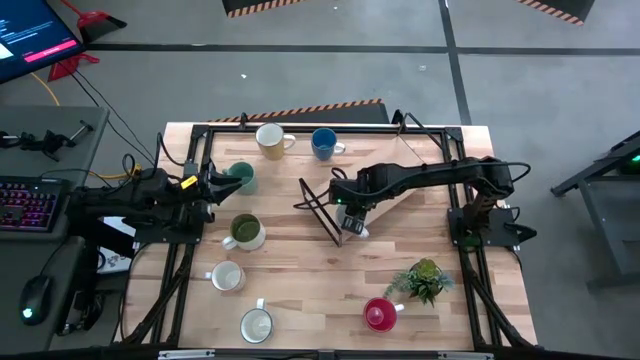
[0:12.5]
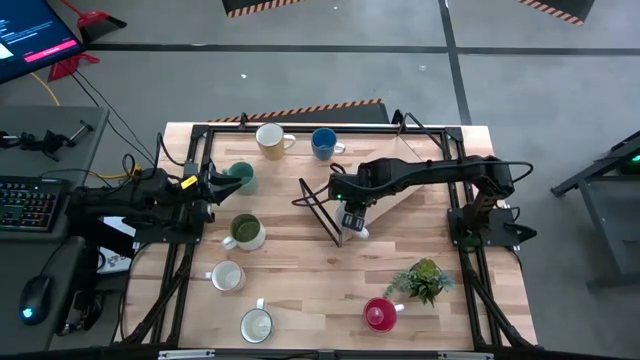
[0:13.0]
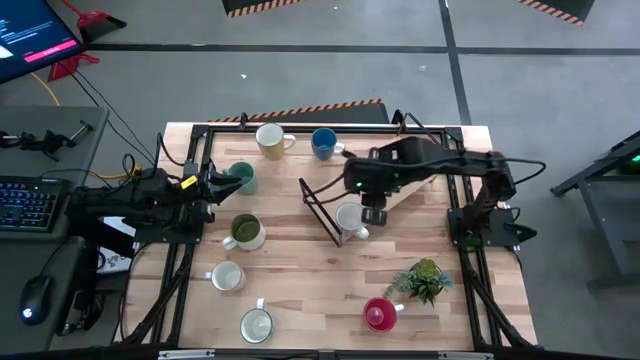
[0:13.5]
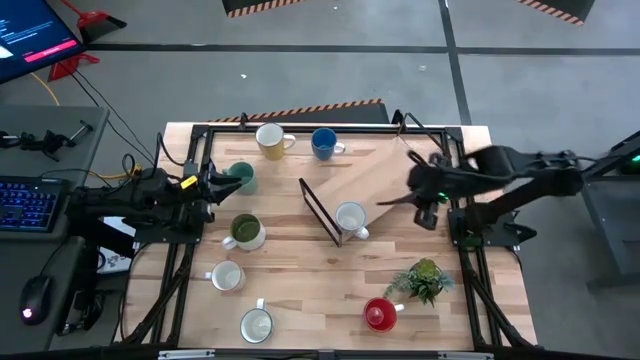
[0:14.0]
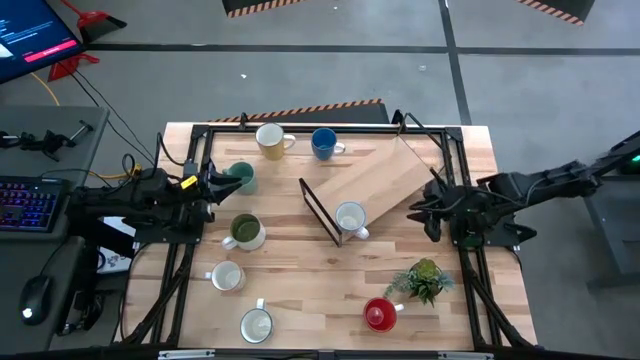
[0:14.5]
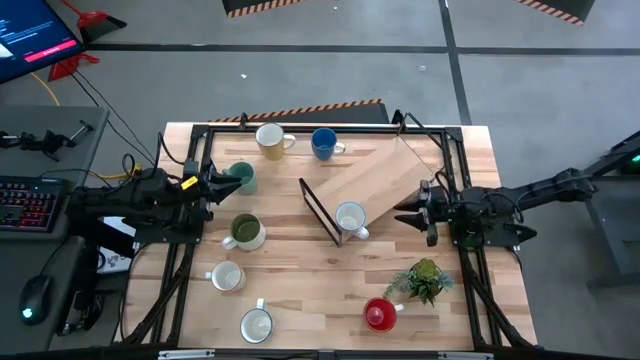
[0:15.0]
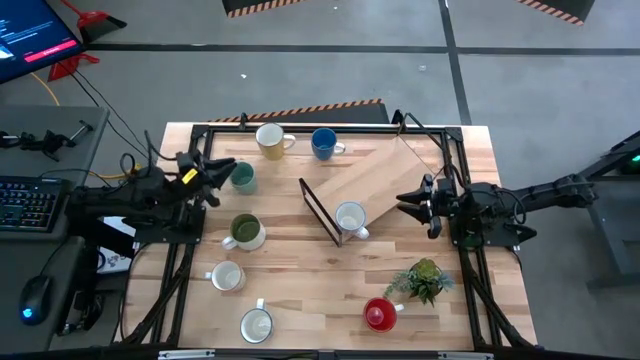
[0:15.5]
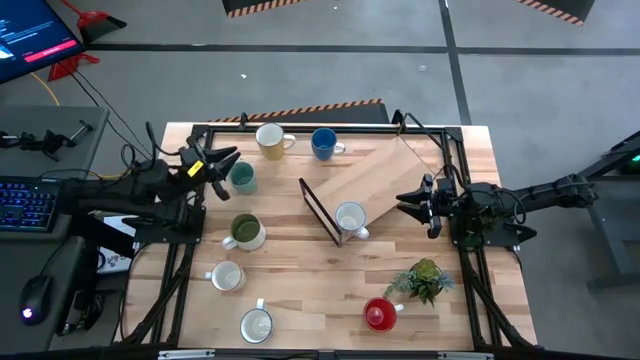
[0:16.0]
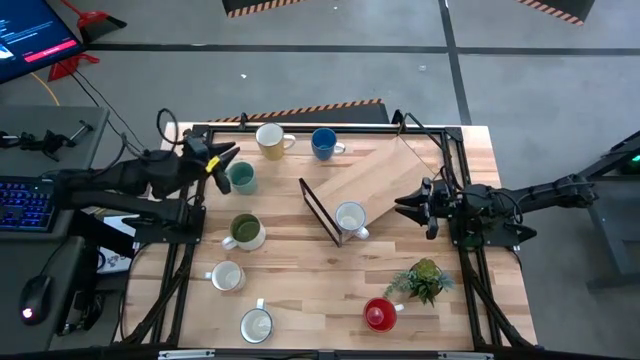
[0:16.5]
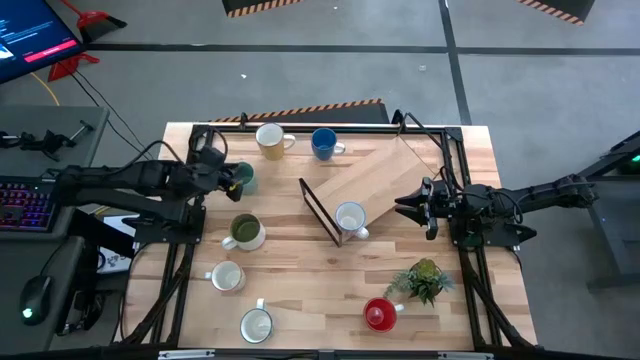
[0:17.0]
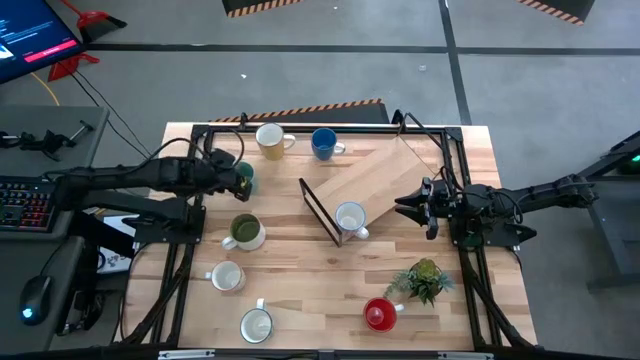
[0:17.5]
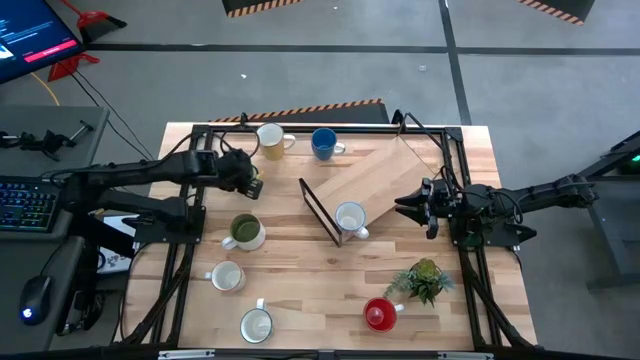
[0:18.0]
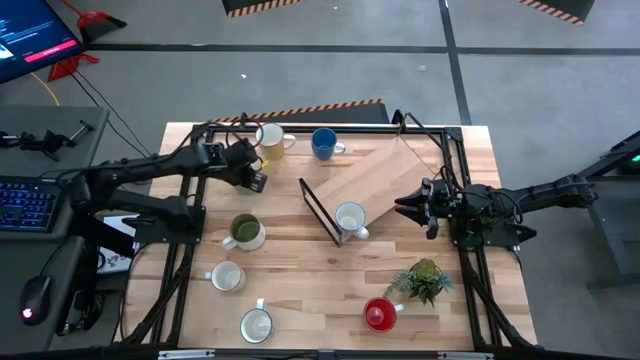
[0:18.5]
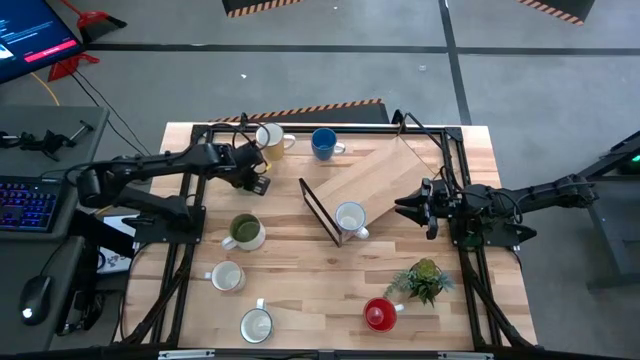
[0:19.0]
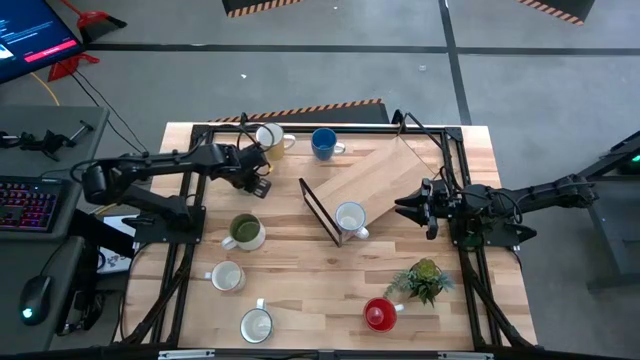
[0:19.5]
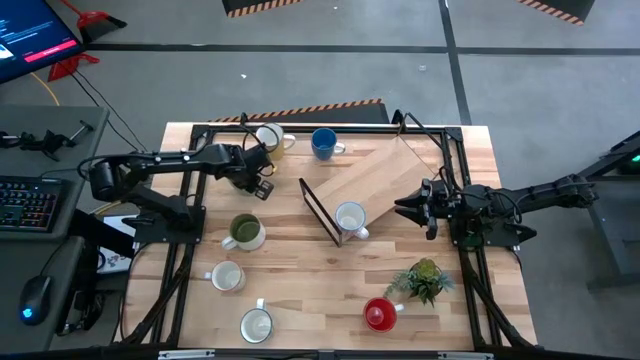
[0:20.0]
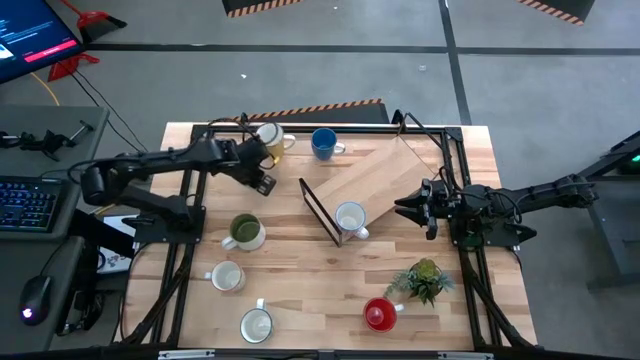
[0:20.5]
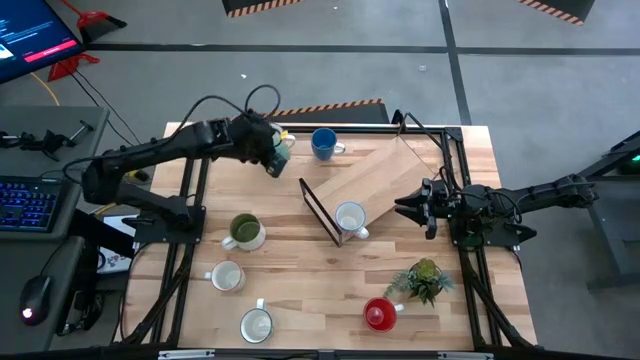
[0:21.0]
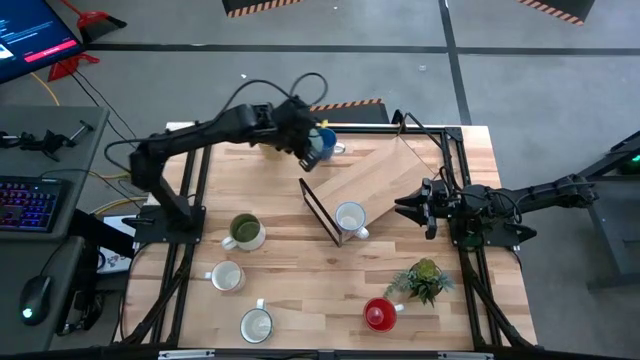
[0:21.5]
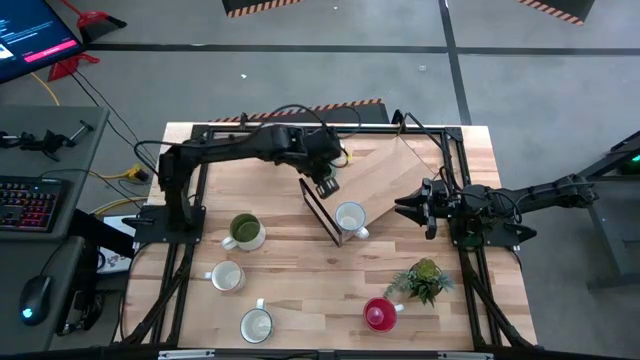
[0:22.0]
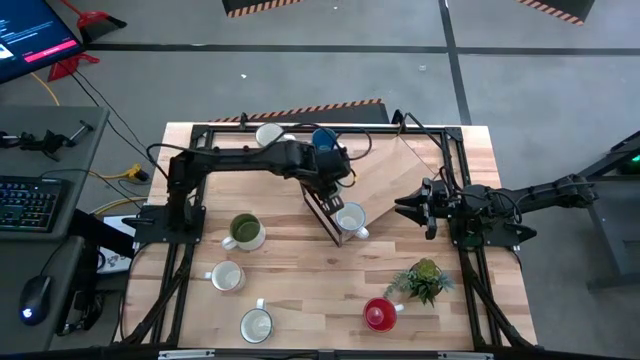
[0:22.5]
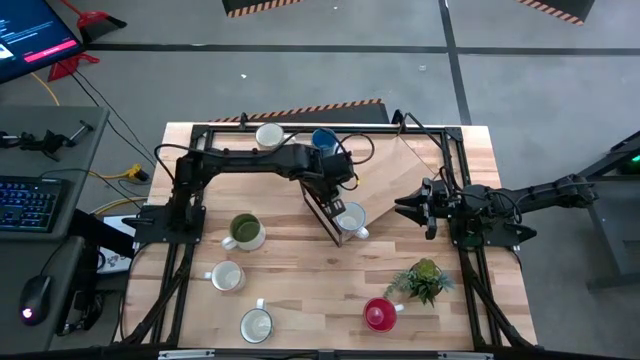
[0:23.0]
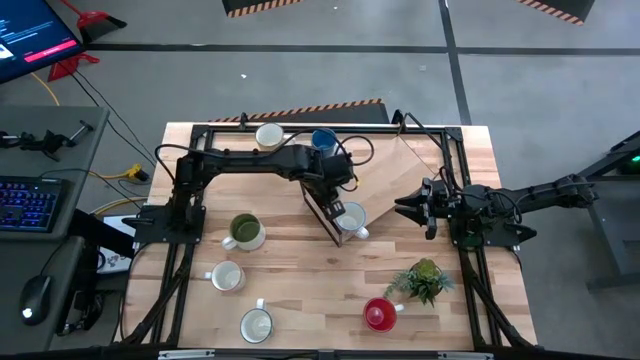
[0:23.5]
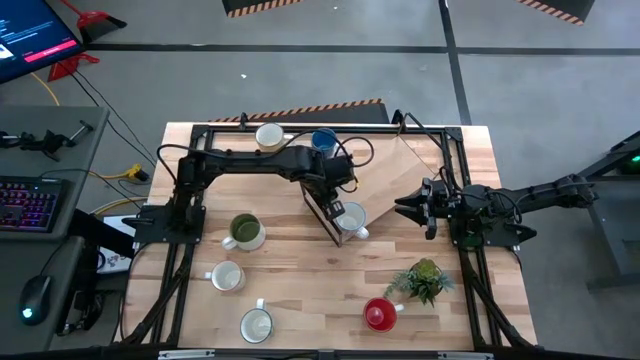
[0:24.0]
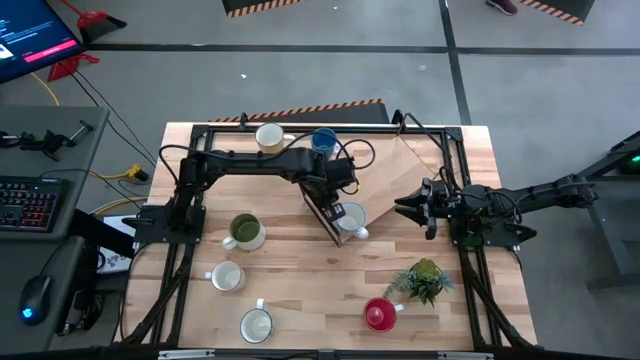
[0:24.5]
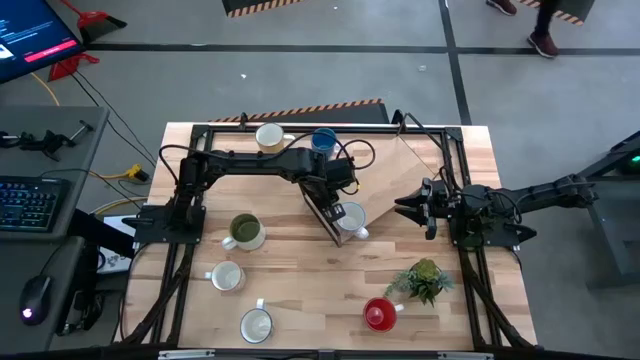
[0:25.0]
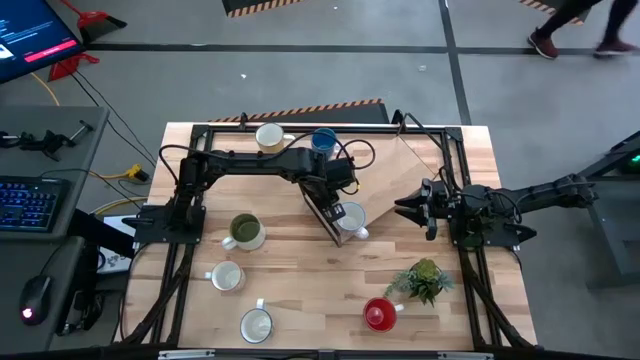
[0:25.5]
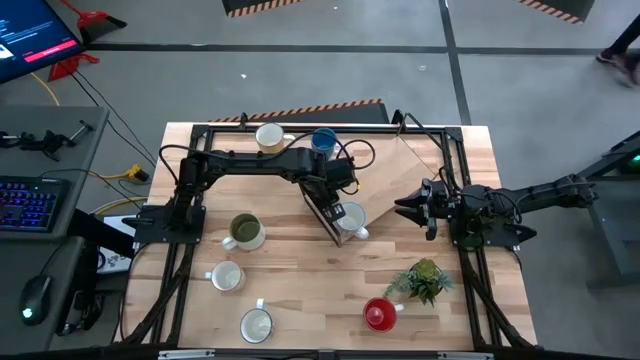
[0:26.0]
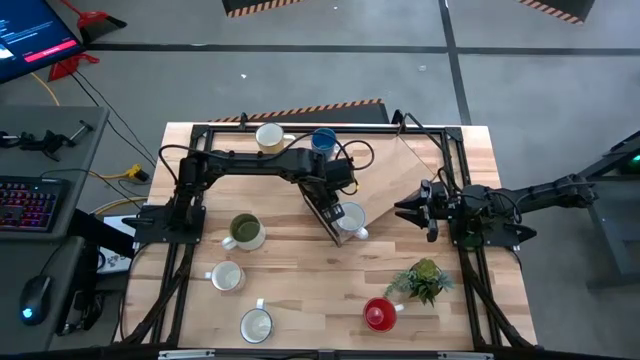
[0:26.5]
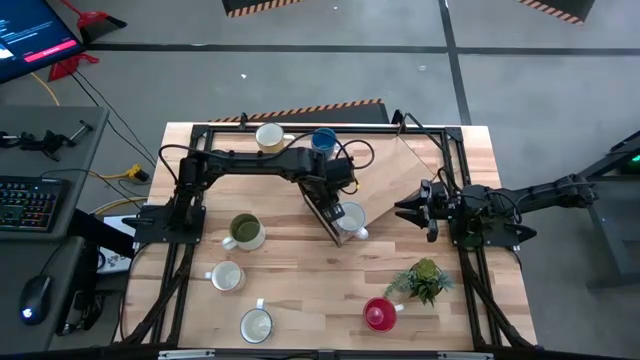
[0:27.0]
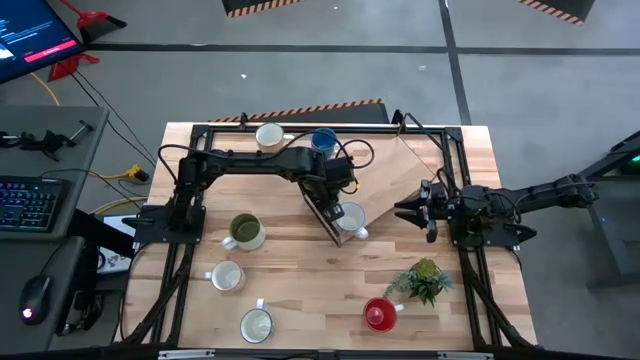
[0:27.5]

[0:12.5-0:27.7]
Task: Place coffee mugs
Put the light green mug on the shelf

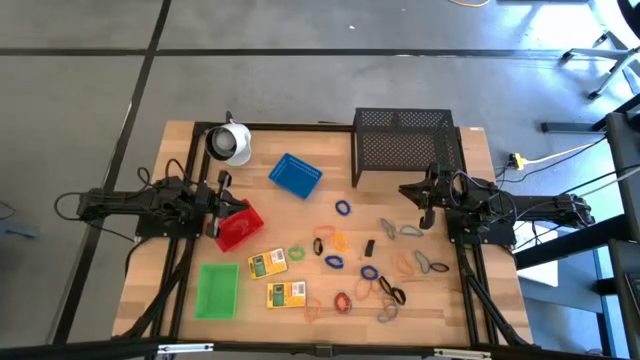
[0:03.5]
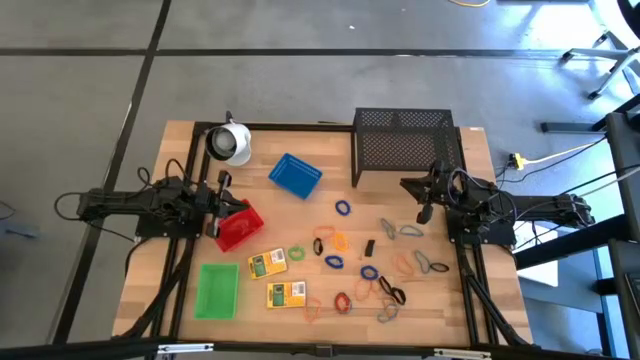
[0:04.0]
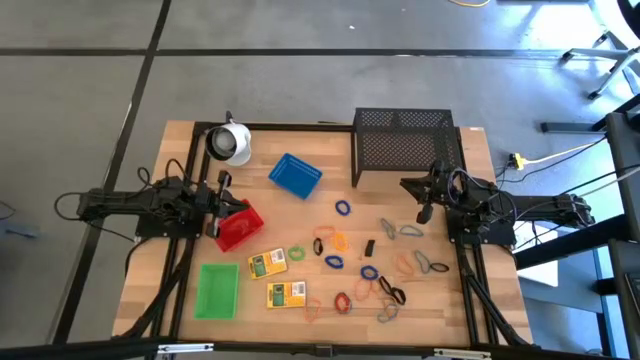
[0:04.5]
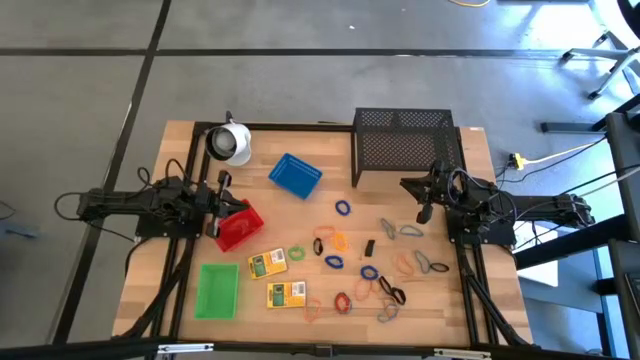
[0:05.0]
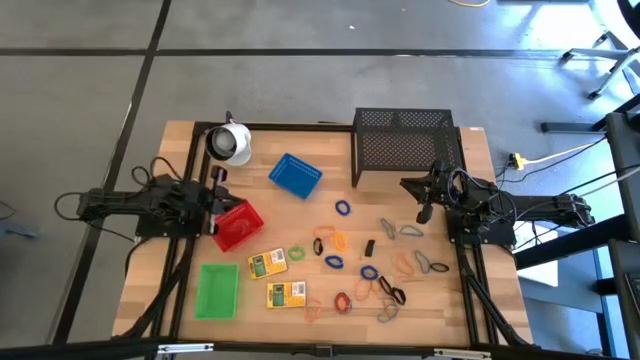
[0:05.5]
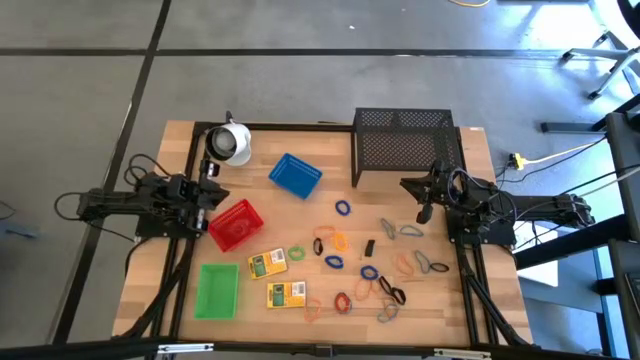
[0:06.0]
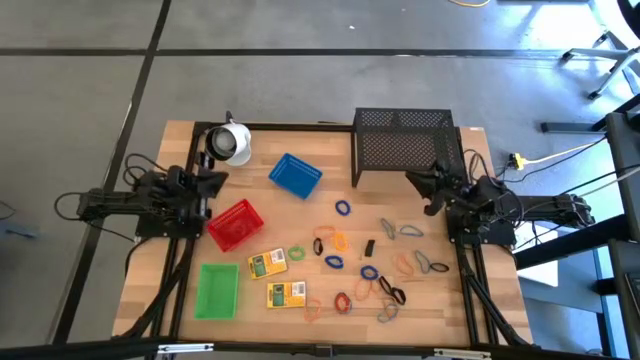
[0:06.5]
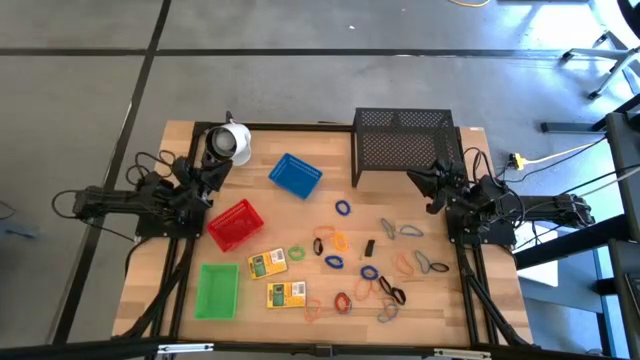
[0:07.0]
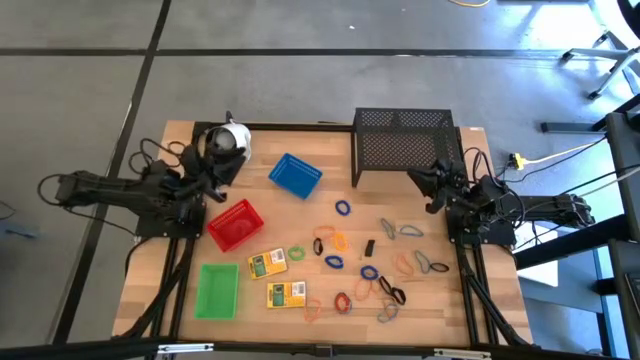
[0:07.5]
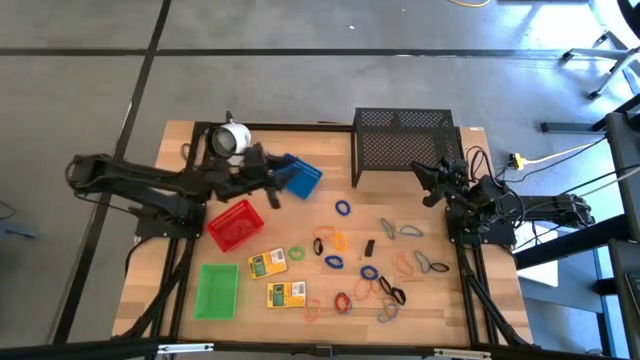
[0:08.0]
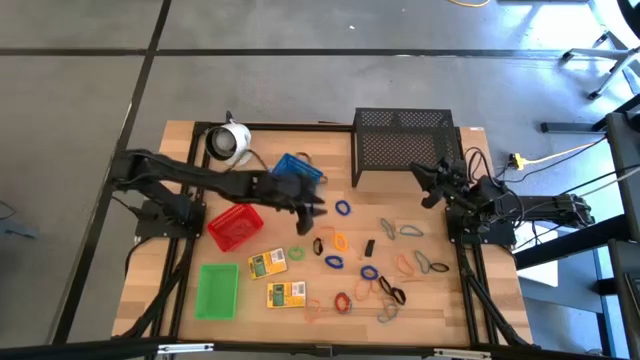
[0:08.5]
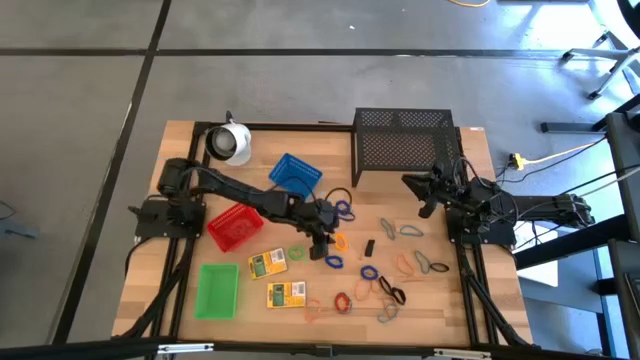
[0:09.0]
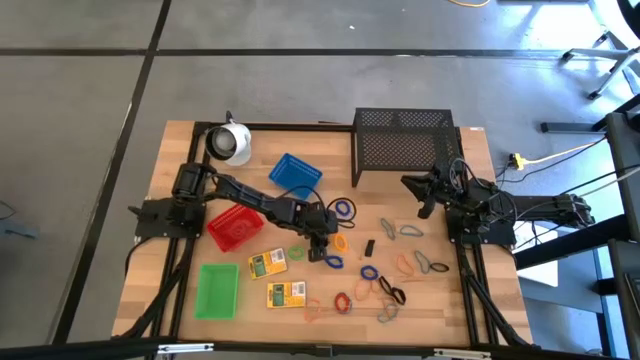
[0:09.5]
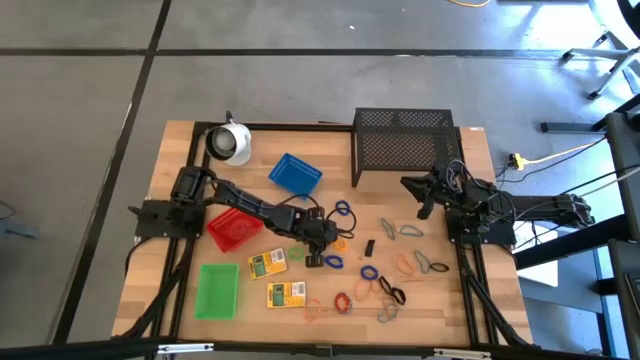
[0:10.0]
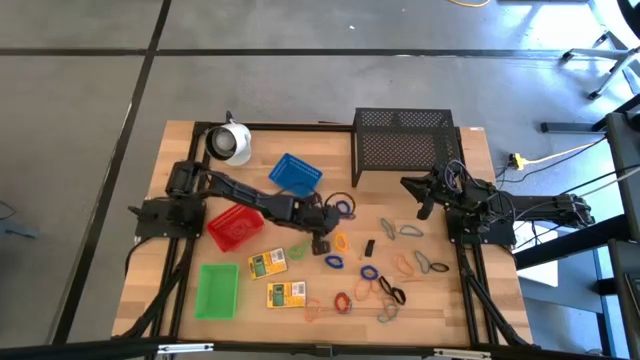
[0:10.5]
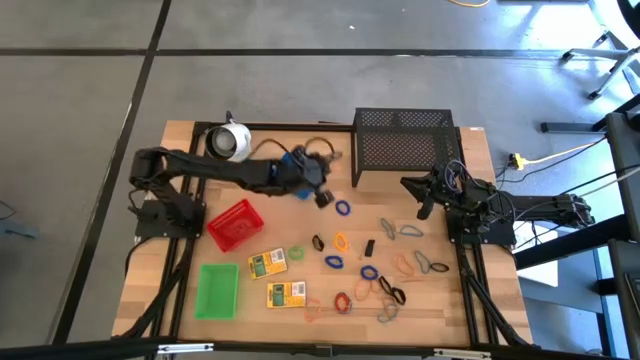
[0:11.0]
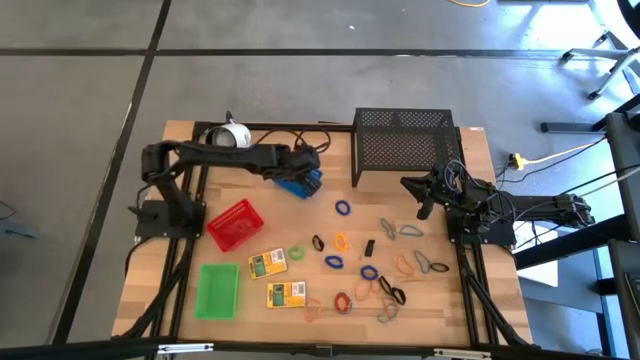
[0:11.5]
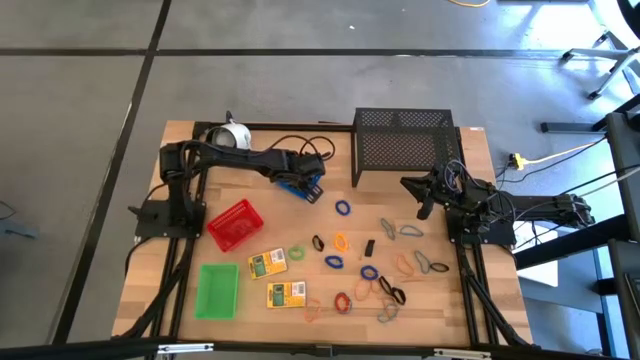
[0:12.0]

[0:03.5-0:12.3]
Task: Pick & Place Office Desk Supplies
Put the orange rubber band into the blue bin
